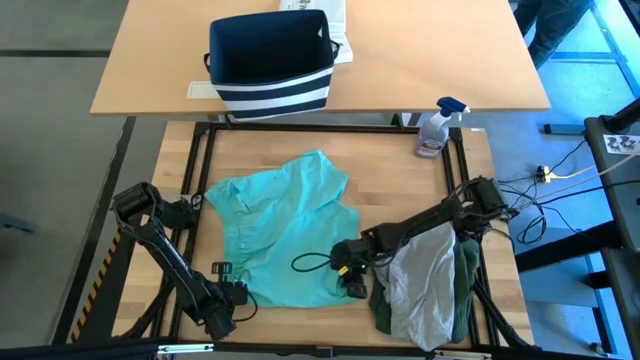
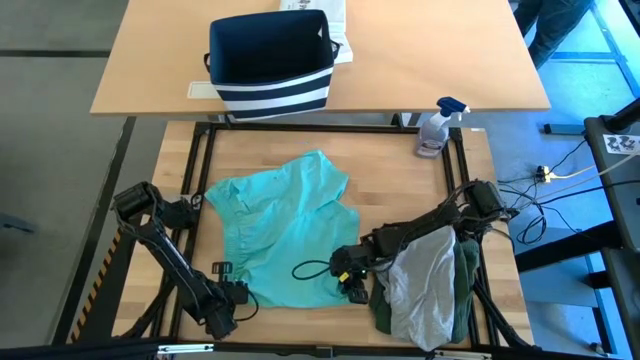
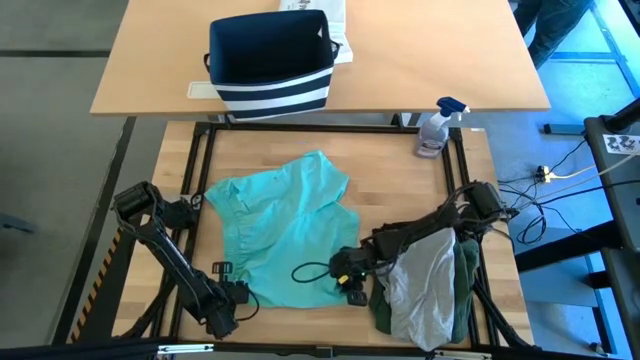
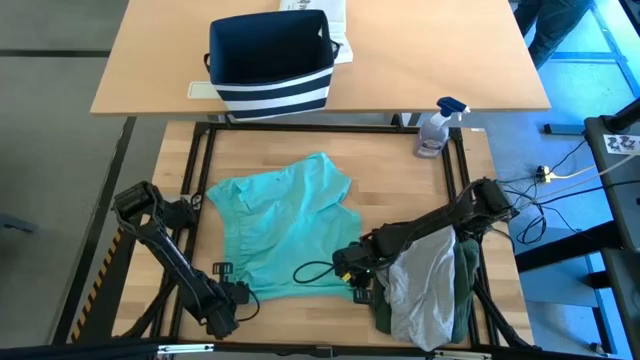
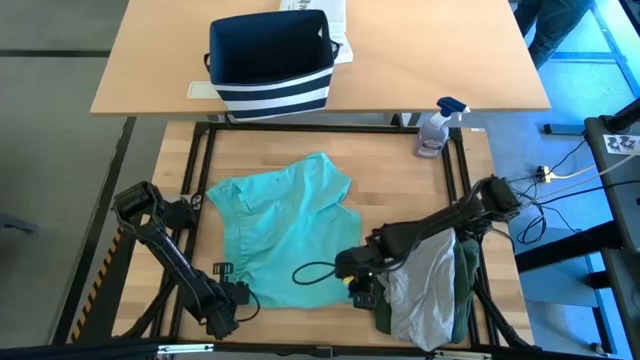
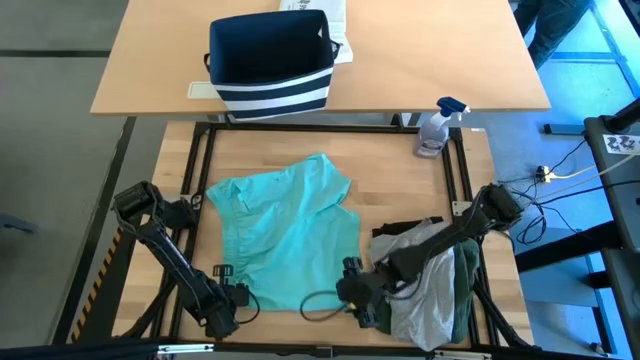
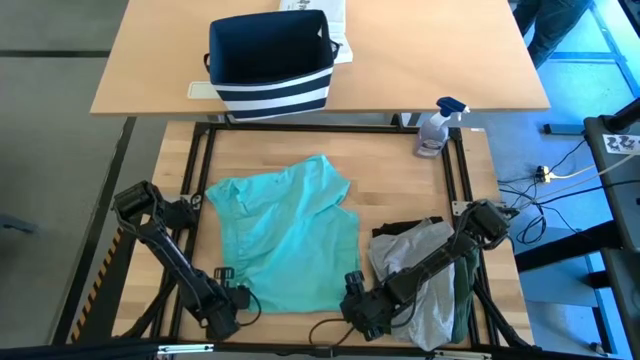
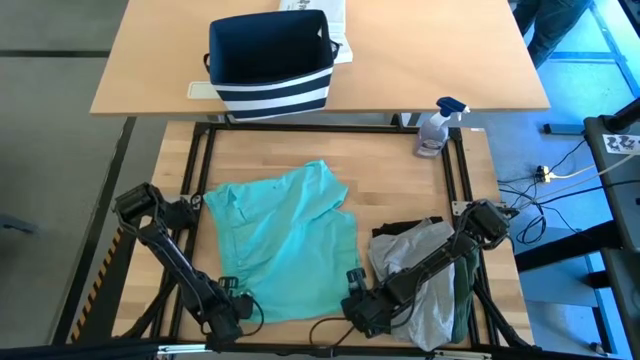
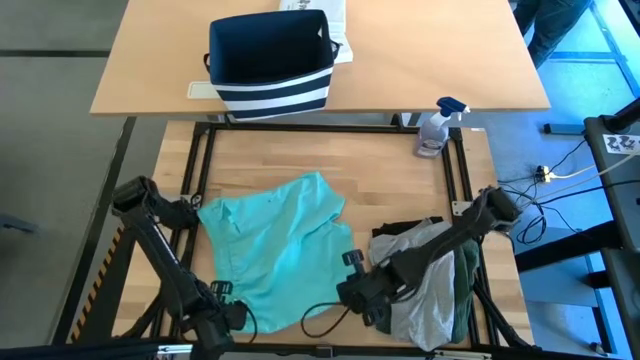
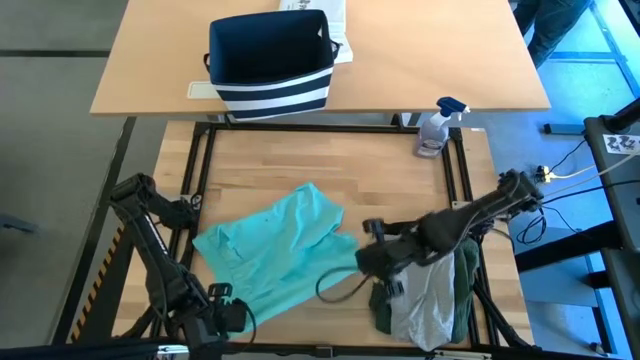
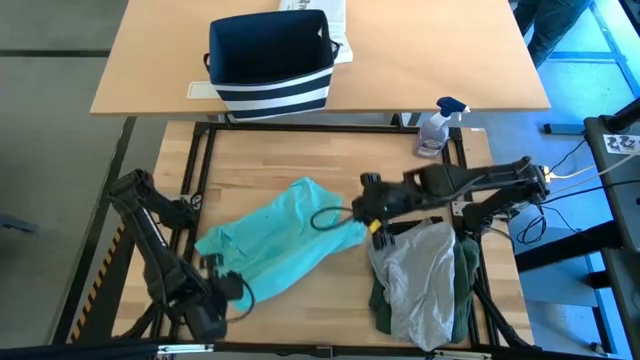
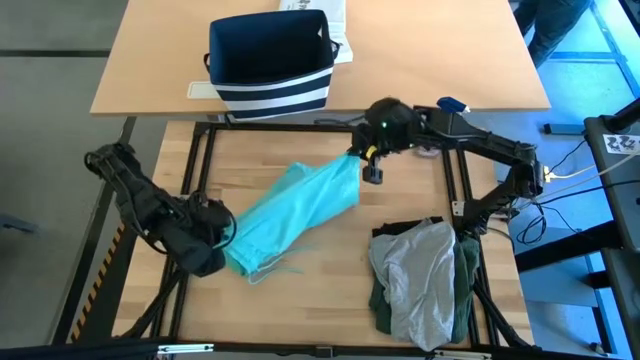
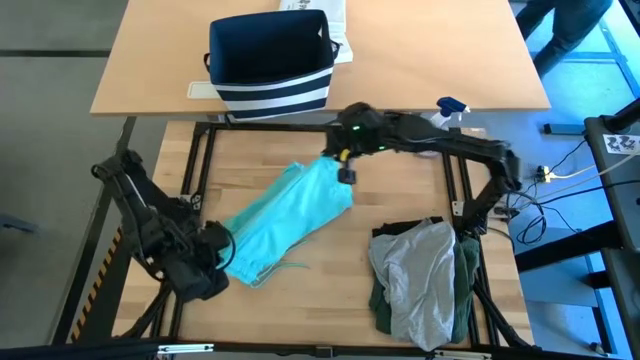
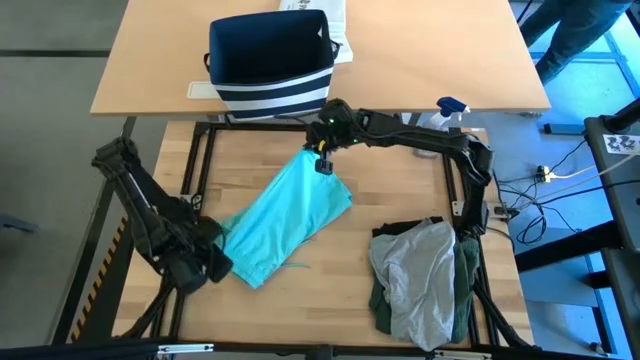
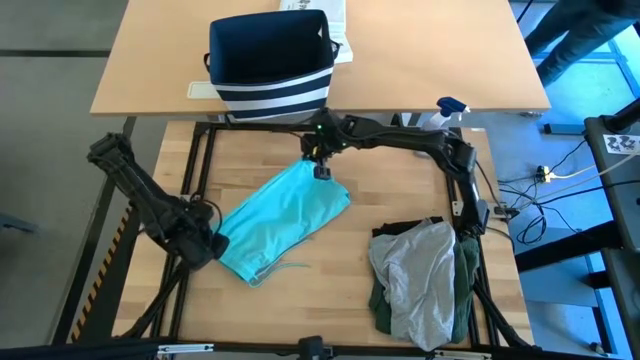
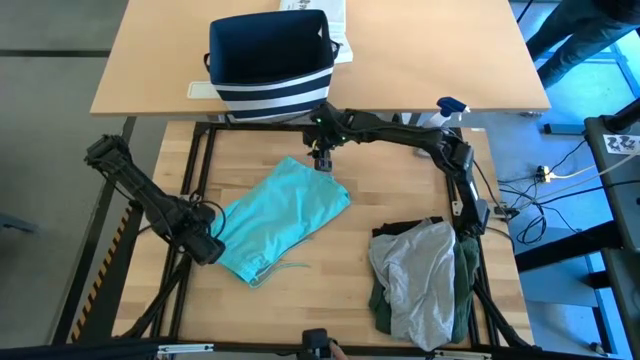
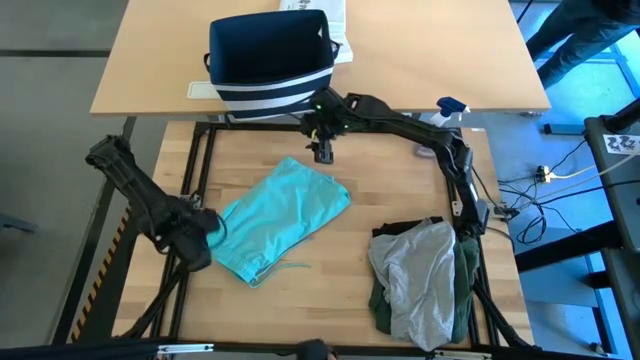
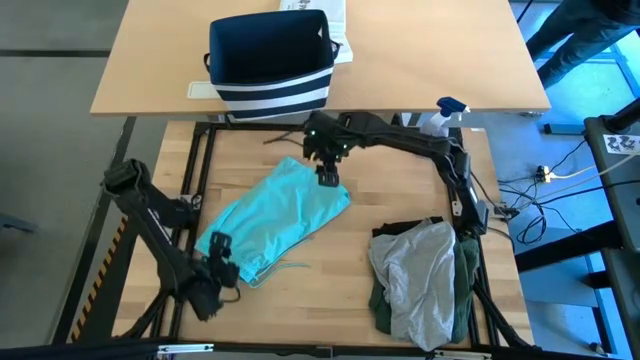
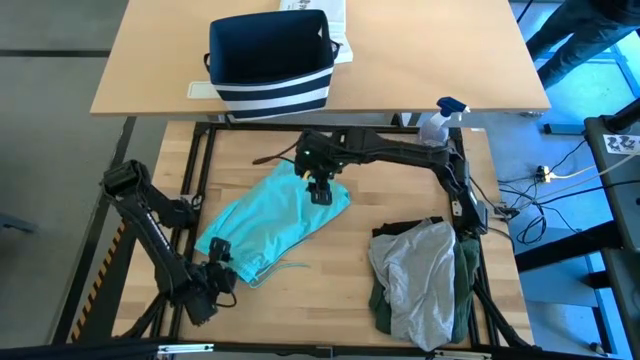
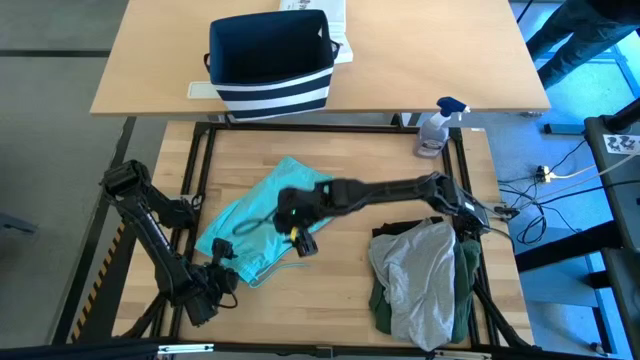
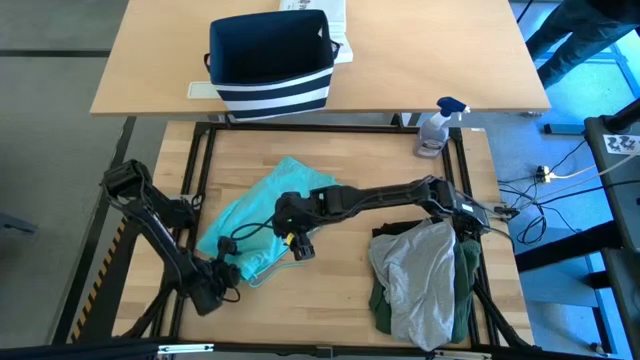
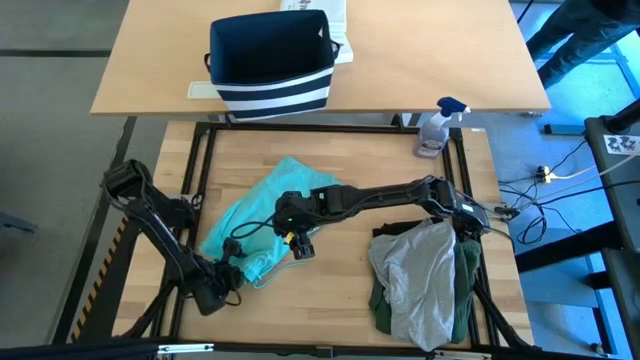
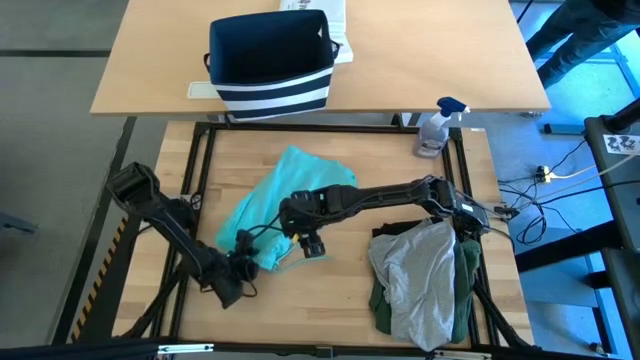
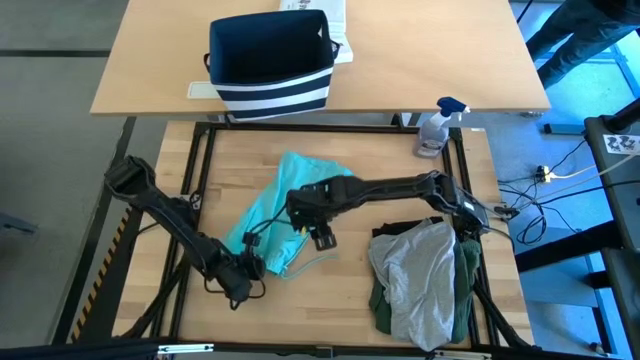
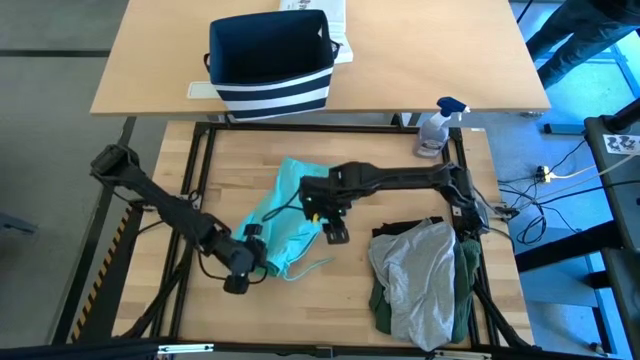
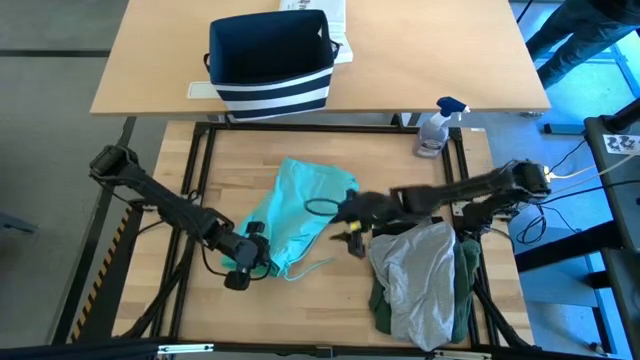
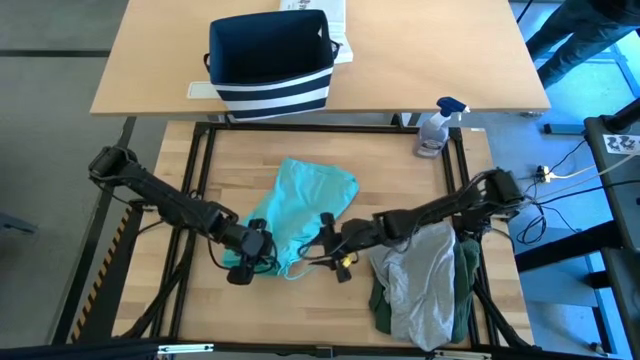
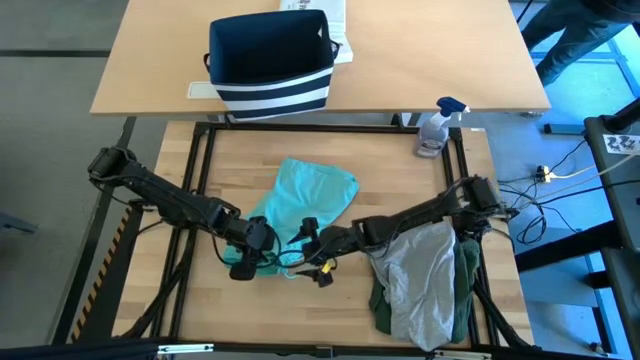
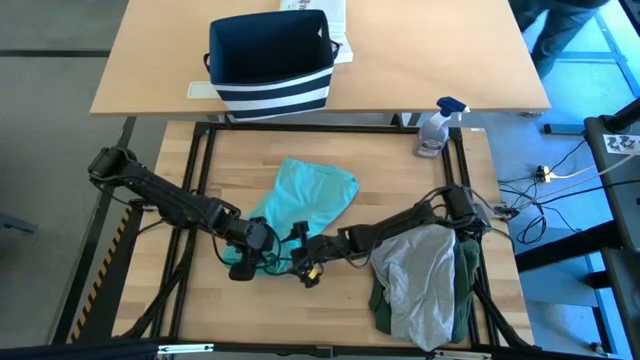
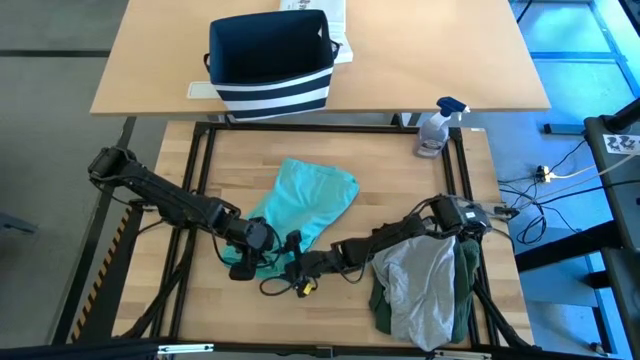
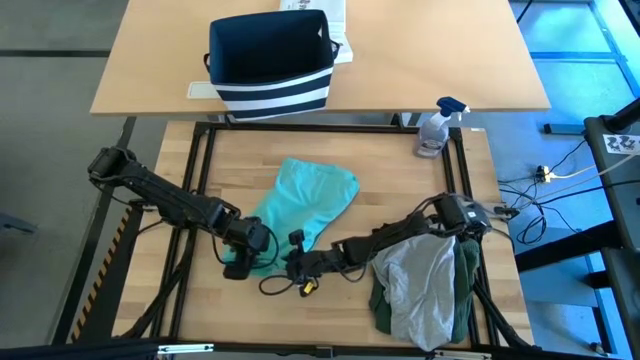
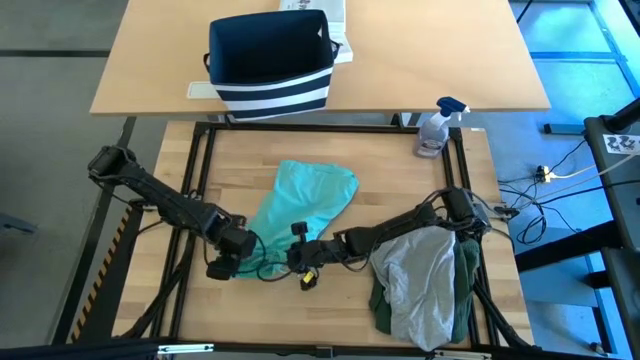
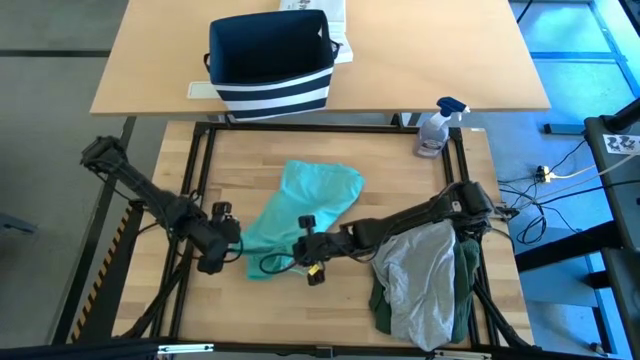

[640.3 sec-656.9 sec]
Task: Fold Laundry from Bin
Fold the blue shorts

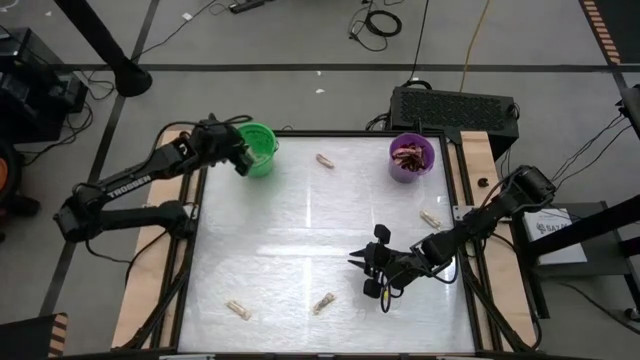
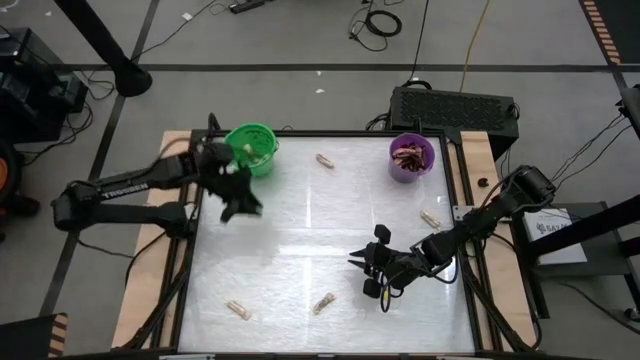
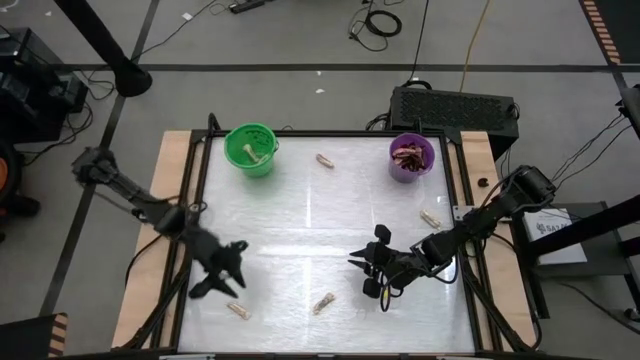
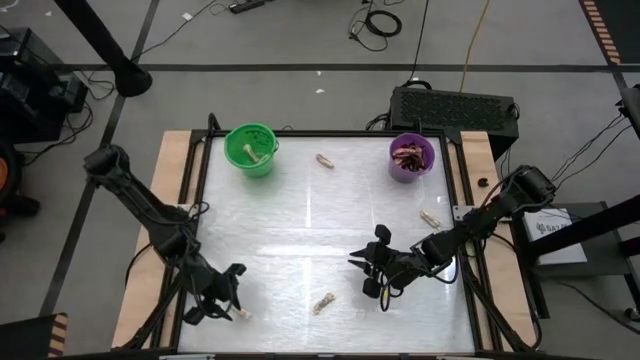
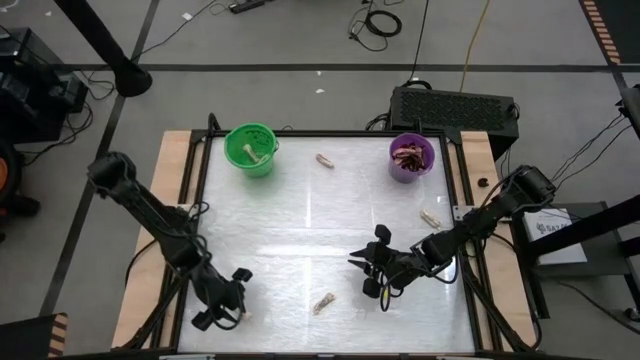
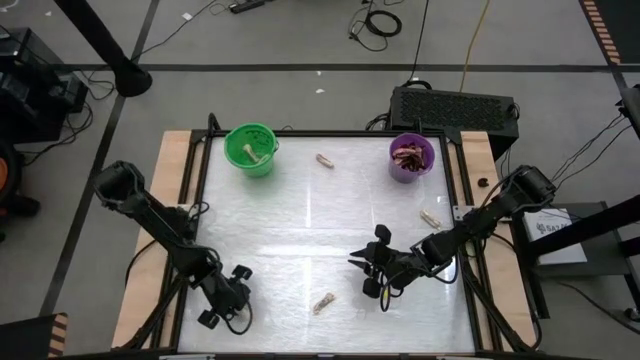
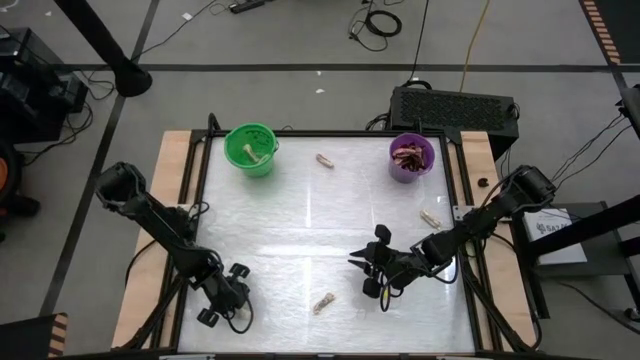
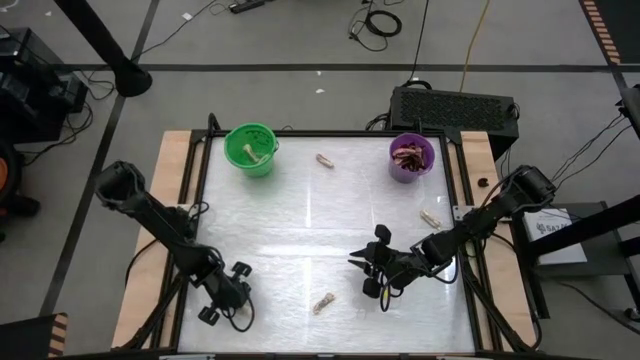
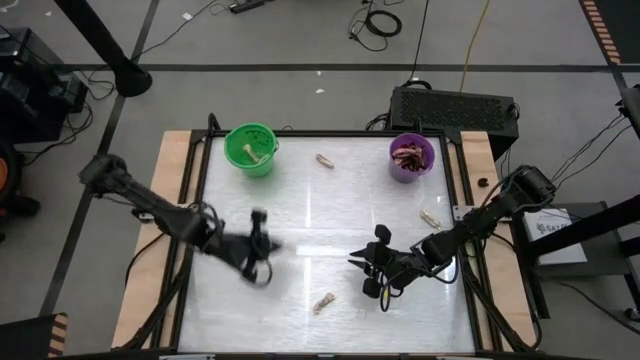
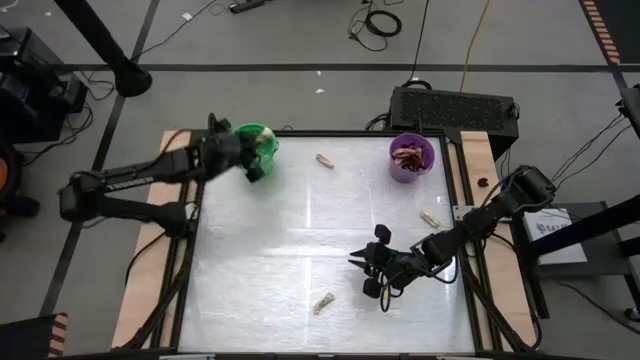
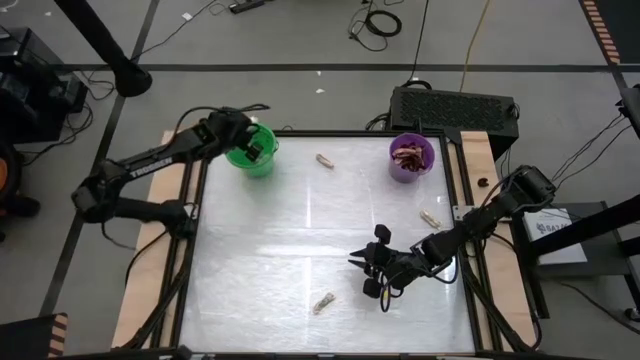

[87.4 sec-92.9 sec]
Task: Sort candy by brand, put in halloween buckets
Put the white chocolate bar into the green bucket
